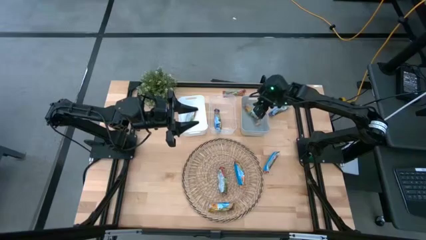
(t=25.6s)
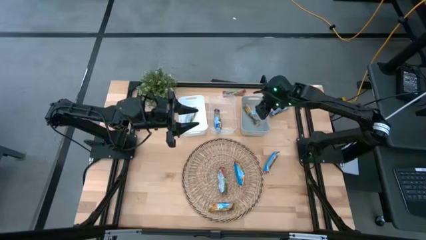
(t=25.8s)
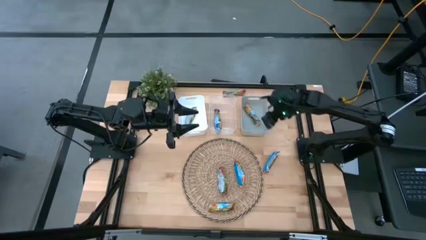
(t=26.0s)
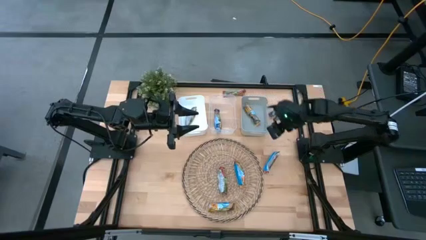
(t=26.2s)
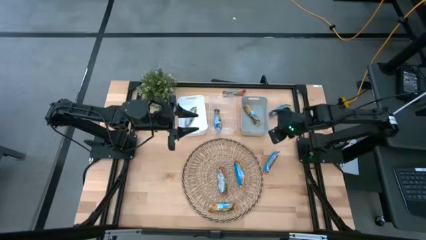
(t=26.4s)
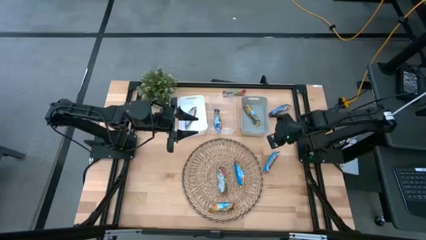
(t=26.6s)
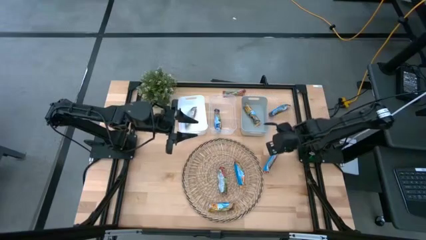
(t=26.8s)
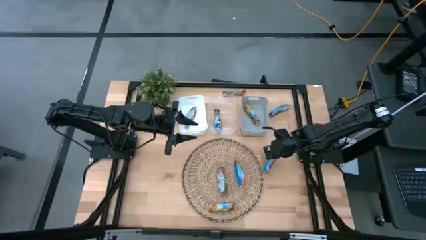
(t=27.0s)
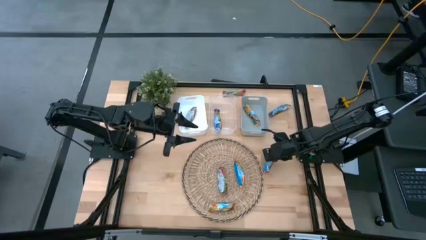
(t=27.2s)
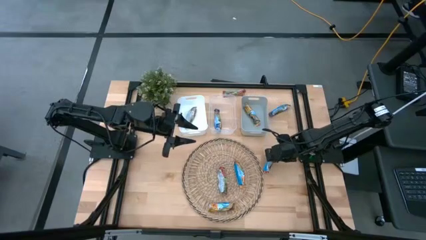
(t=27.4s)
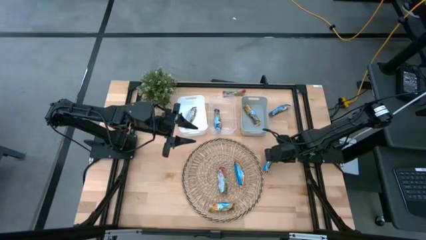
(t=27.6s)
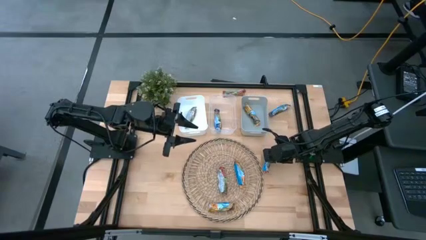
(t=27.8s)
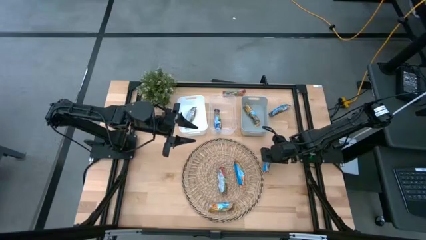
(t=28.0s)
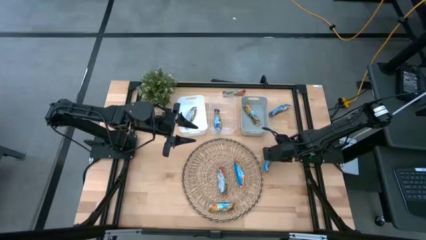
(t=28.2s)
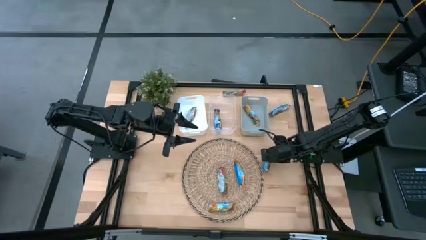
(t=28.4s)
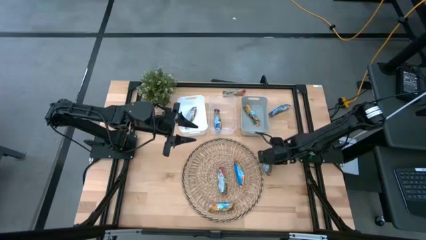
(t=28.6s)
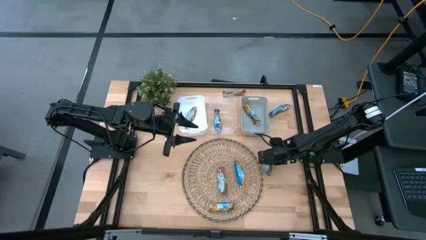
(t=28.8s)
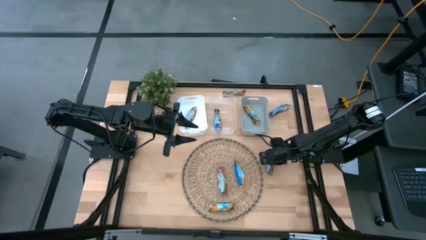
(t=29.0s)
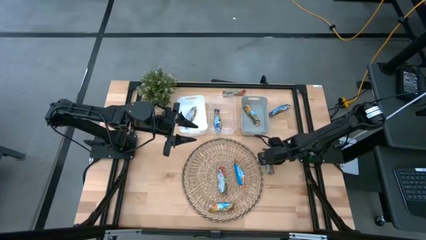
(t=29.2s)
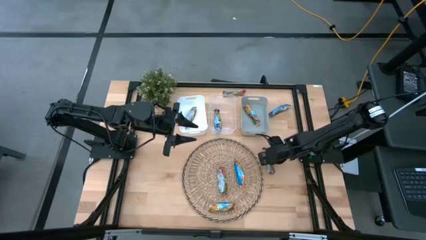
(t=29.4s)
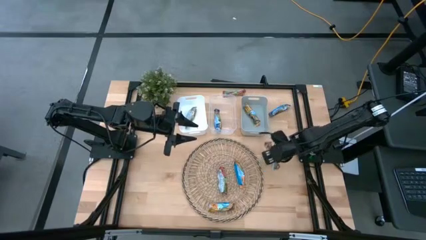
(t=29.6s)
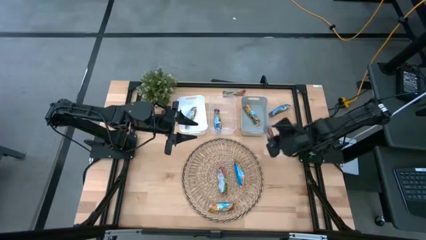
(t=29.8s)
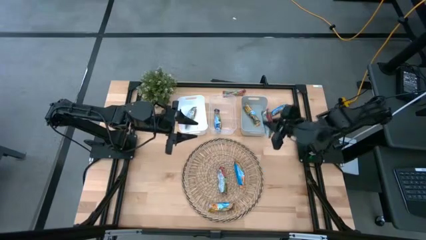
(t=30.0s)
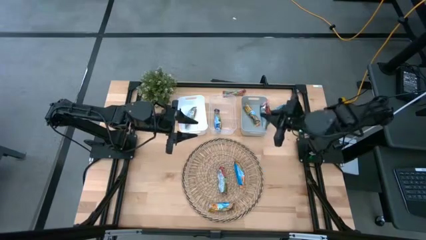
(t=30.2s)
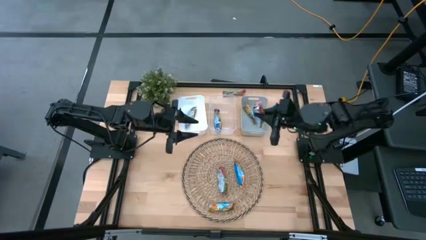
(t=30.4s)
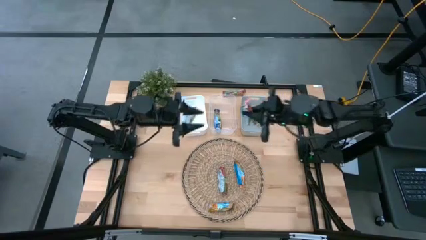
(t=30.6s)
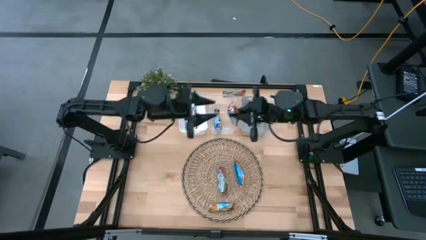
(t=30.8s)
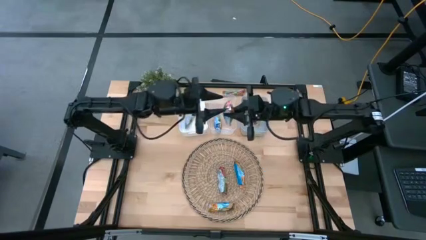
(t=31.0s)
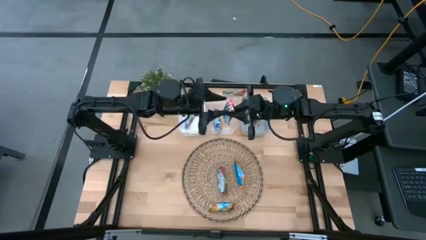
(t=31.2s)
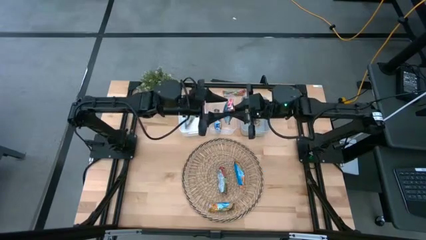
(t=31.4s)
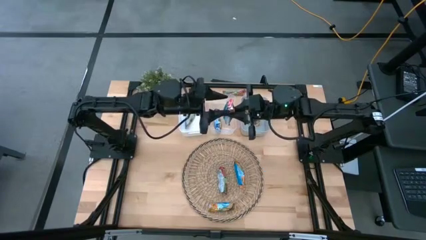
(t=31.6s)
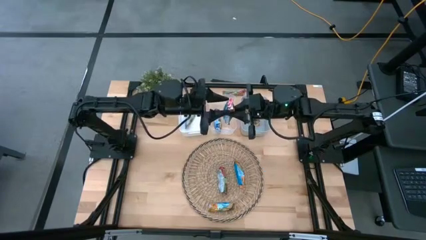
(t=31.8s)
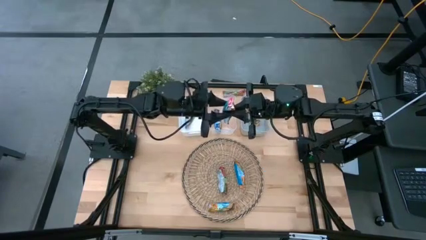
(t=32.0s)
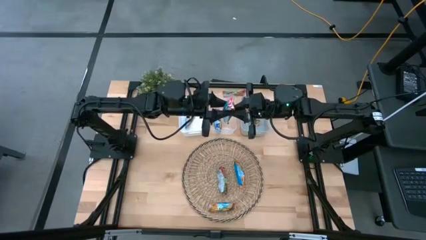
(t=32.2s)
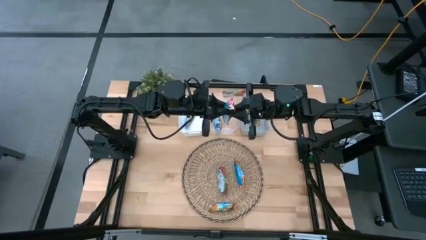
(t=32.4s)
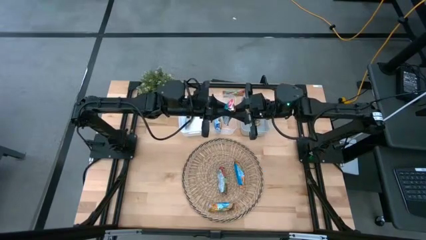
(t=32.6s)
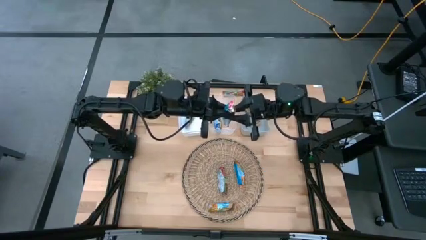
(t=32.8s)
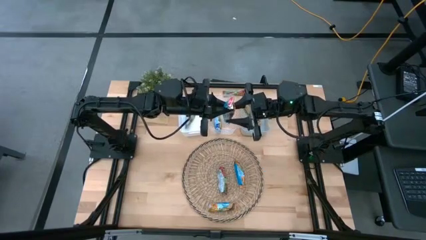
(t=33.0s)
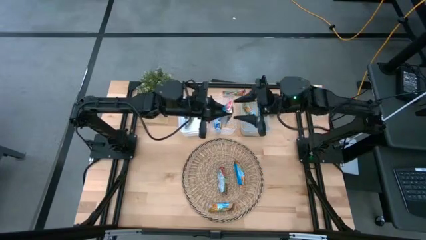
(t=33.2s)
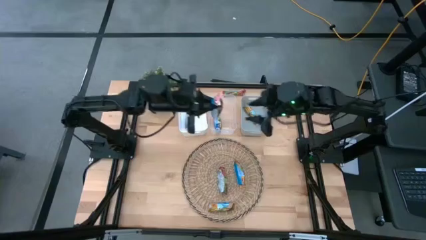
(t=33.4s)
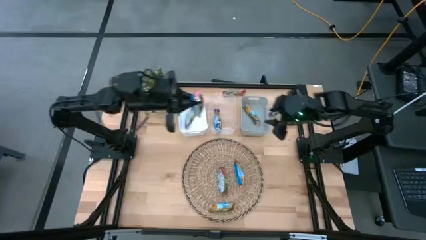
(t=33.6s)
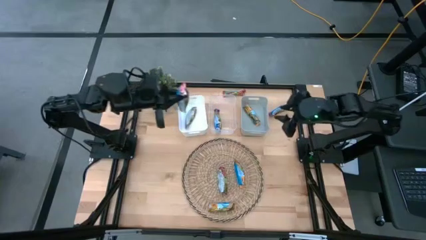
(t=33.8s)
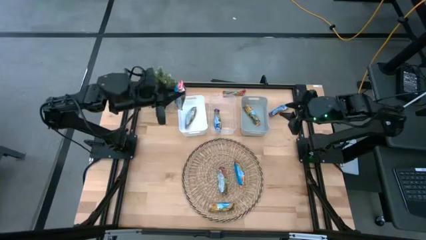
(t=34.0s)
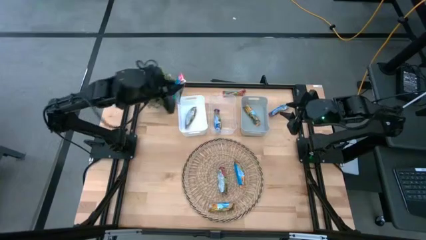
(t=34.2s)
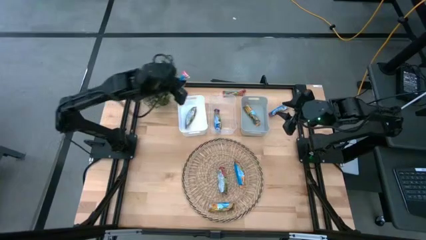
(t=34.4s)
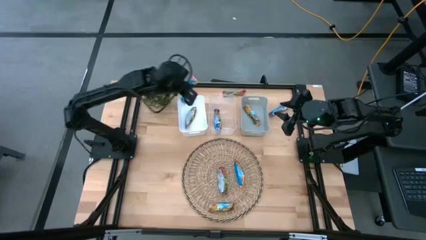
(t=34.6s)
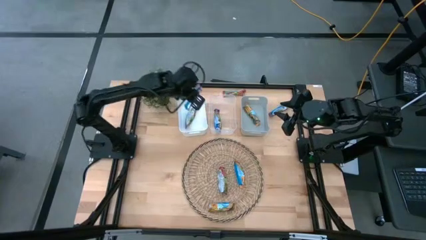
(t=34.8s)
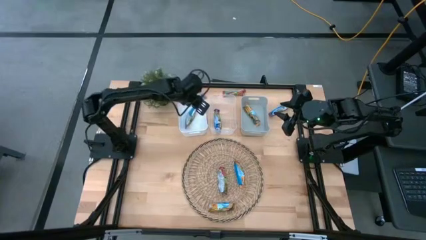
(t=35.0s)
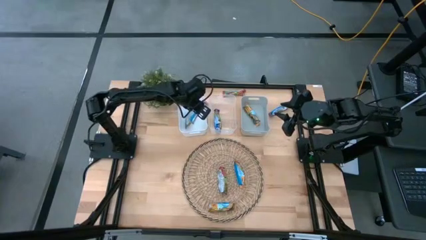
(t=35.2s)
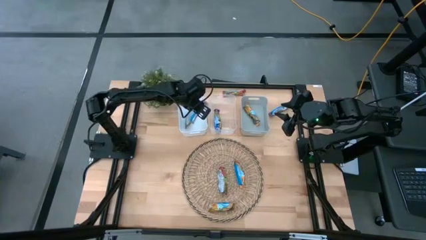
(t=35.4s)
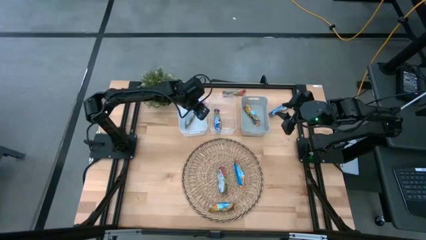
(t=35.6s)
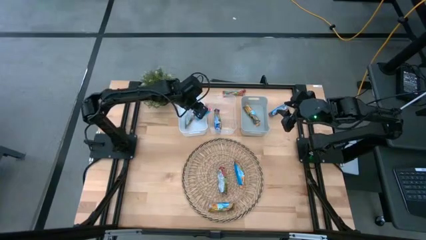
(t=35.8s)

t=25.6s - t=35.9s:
Task: Pick and place Granola Bars by type
Put the middle right red granola bar into the white bin
